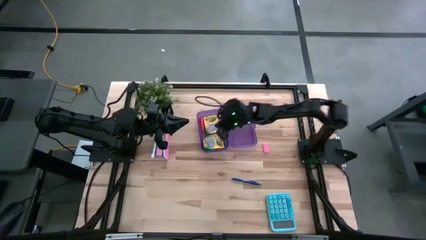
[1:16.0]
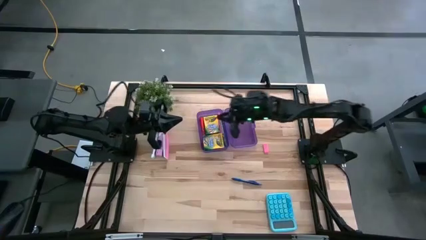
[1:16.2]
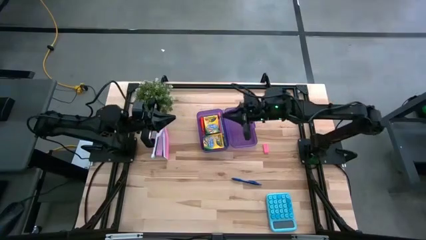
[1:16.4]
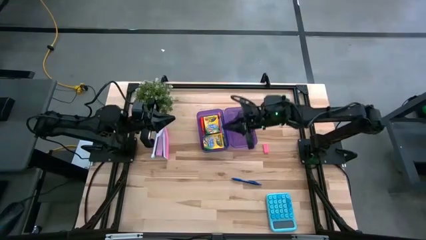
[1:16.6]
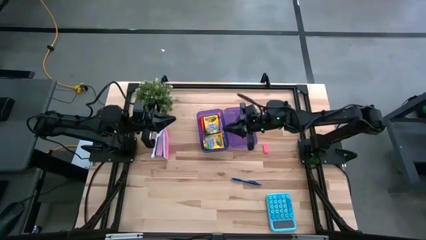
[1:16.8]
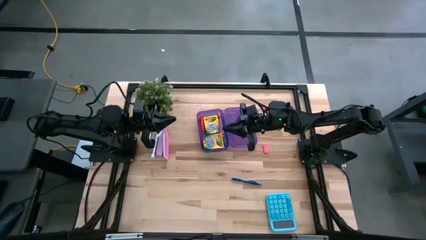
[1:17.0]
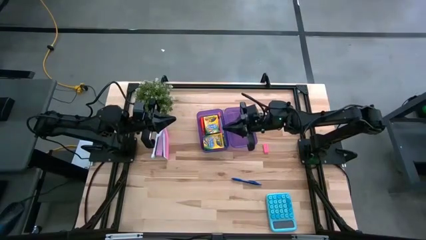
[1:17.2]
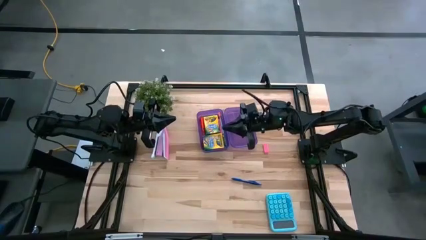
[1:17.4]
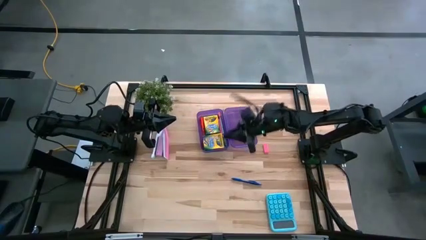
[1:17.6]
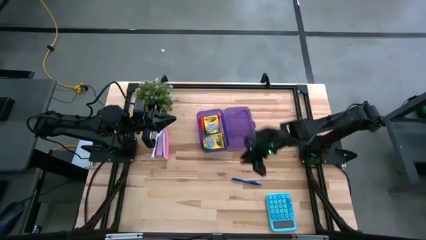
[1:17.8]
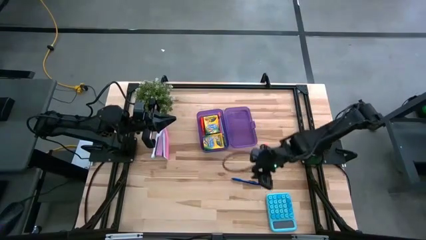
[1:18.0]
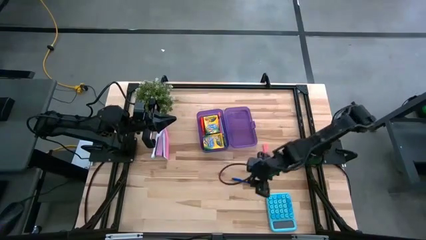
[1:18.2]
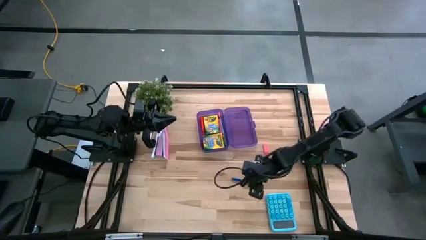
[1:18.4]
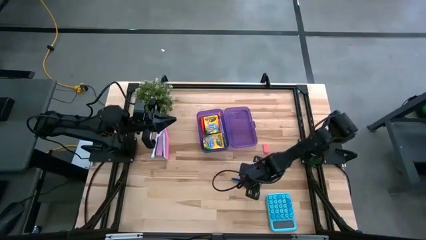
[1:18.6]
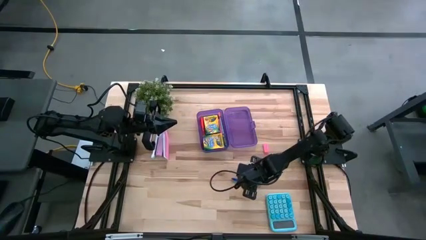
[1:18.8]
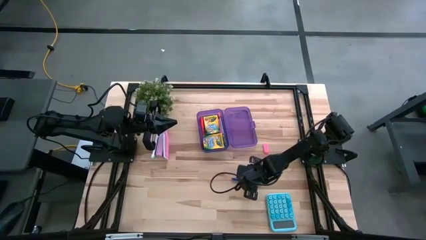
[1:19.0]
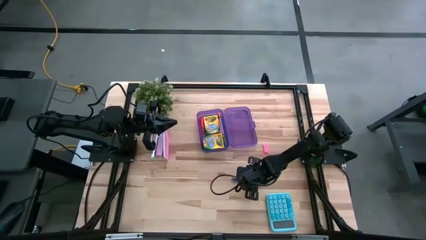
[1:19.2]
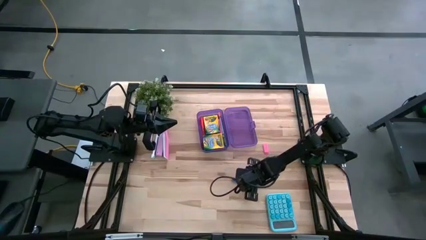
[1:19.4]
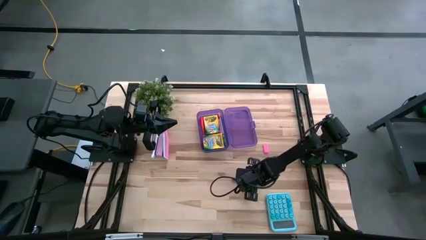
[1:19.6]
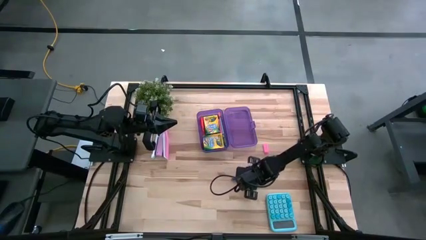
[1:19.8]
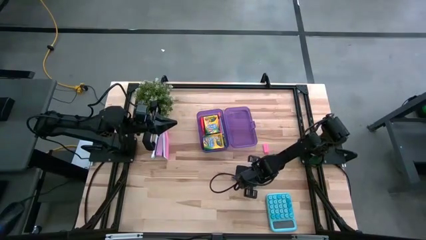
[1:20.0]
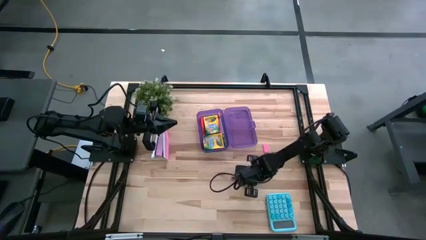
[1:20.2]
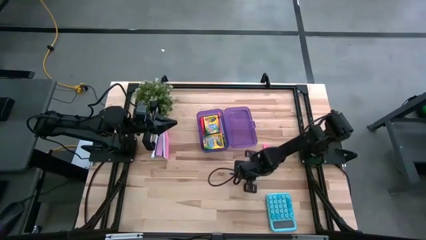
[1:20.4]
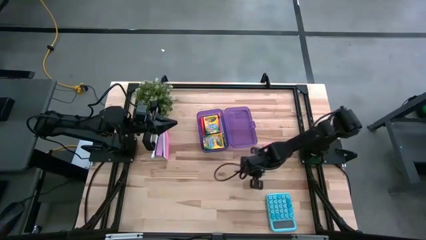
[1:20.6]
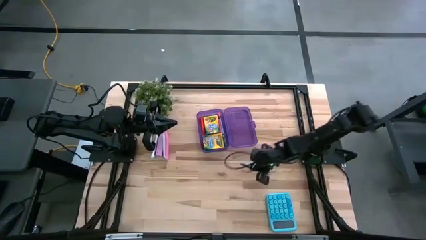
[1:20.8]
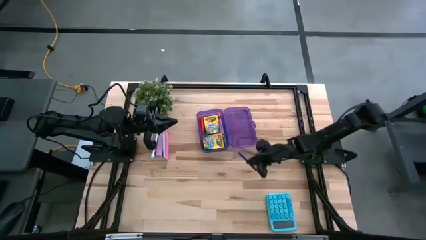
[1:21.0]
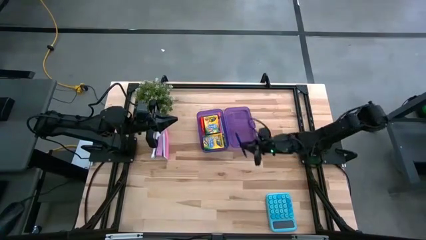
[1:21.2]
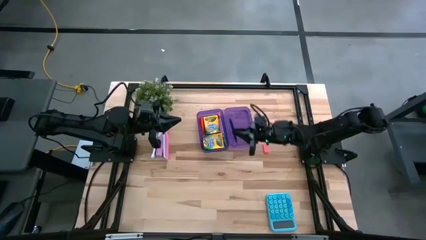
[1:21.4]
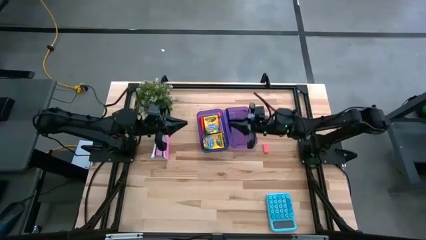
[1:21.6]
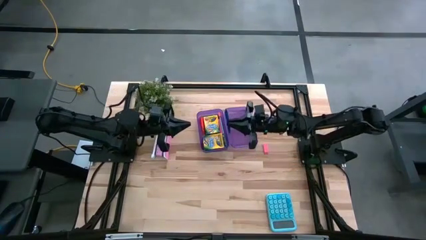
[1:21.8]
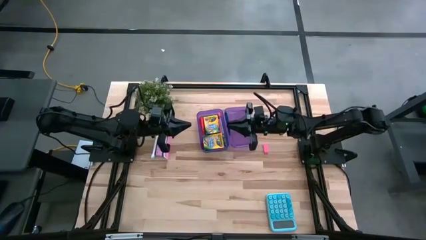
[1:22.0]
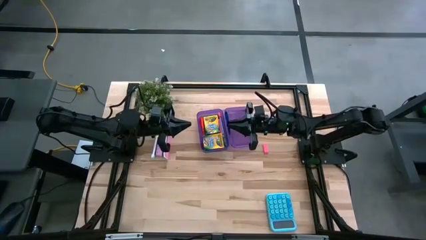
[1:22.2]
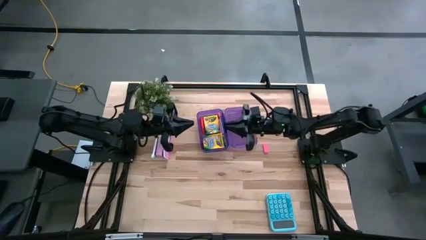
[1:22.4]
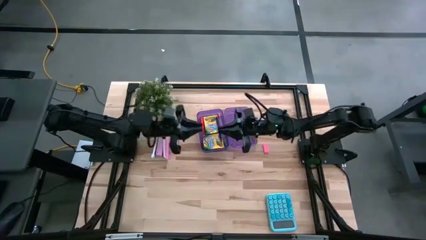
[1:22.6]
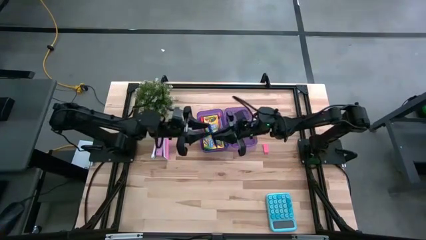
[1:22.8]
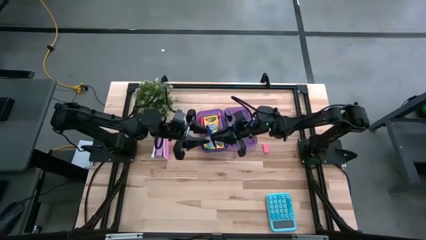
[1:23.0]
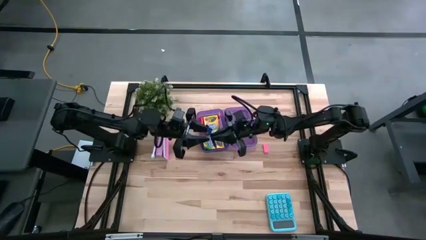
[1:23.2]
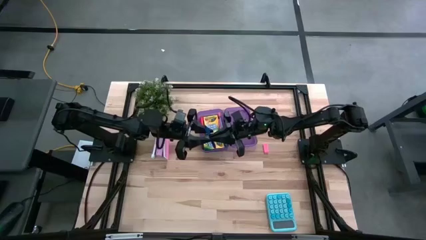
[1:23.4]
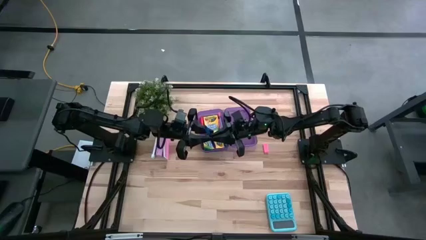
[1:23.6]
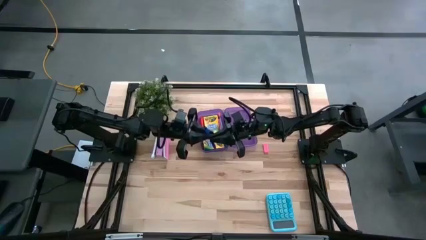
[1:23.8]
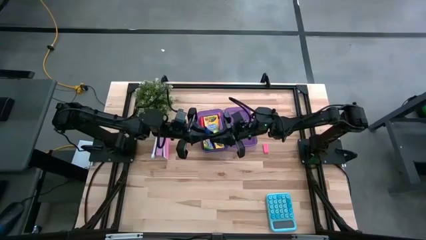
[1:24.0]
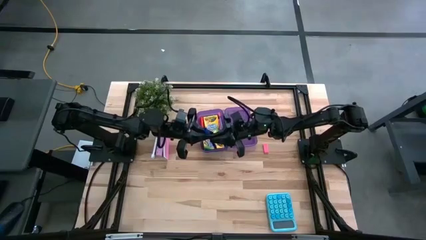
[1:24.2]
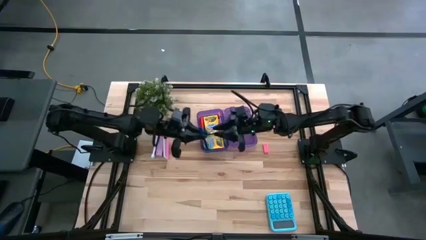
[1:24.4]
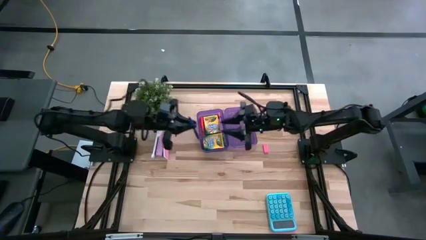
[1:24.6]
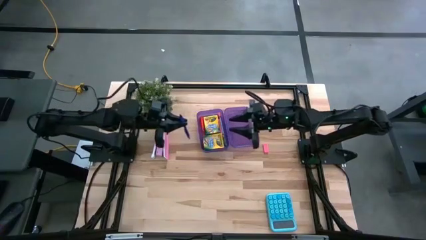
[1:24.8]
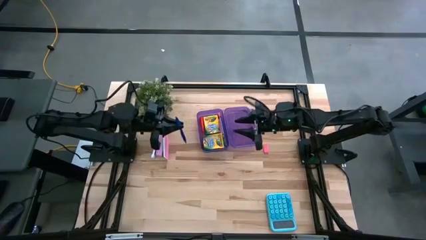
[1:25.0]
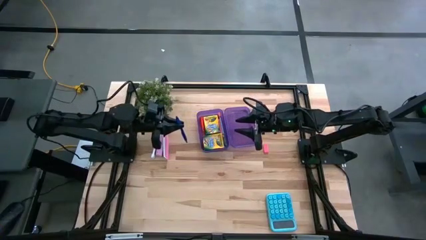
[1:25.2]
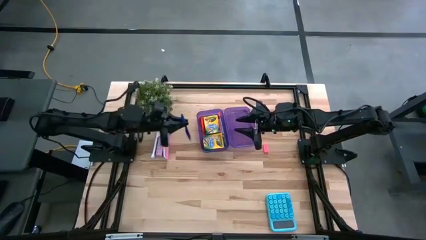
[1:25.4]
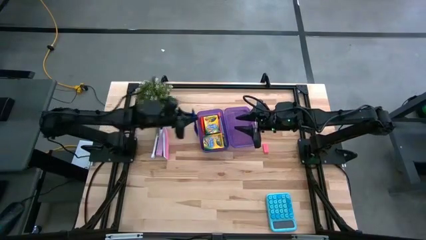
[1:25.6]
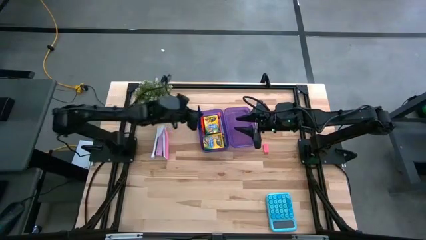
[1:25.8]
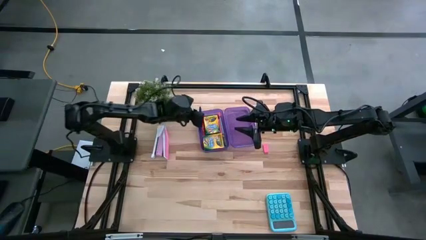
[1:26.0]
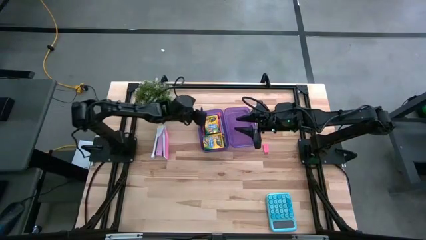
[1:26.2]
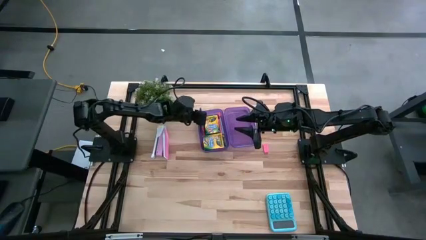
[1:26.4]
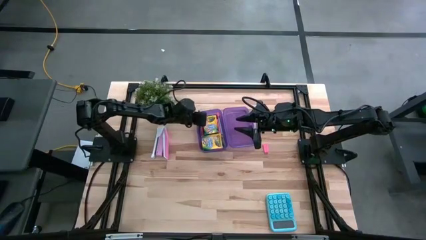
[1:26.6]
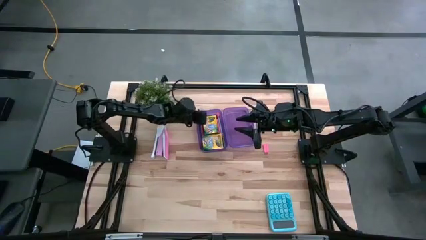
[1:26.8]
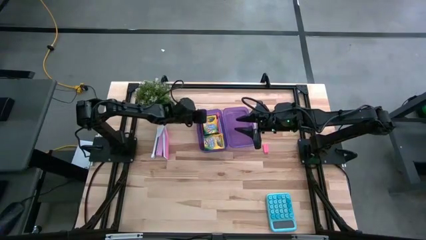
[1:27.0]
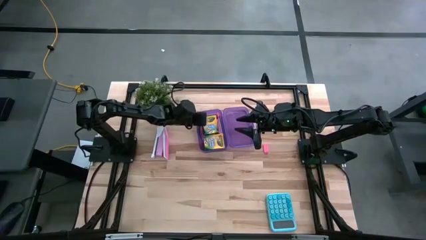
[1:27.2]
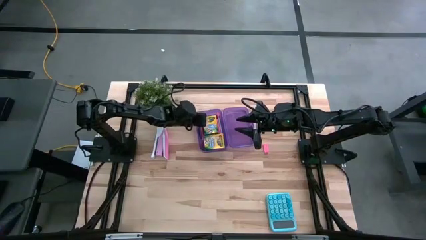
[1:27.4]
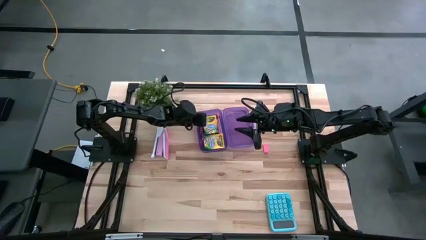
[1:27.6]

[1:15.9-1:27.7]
Task: Pick & place school supplies into a supply box
Put the blue pen into the purple supply box

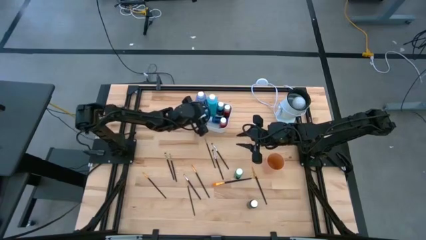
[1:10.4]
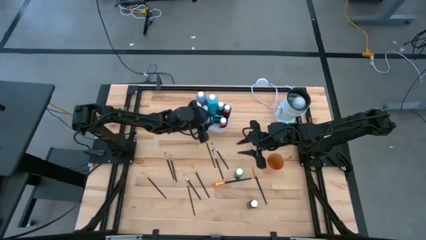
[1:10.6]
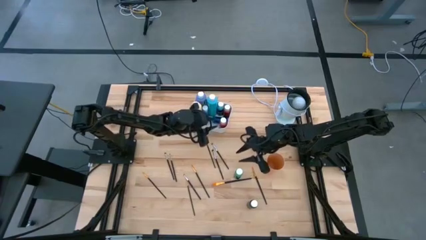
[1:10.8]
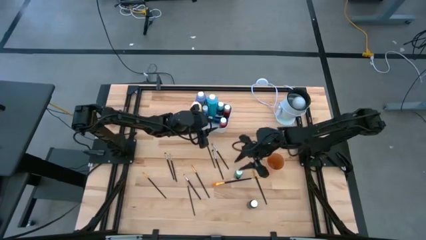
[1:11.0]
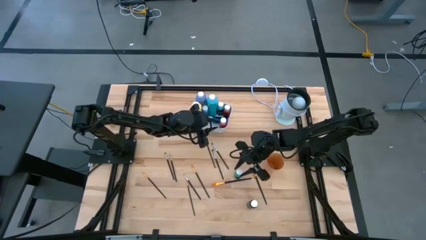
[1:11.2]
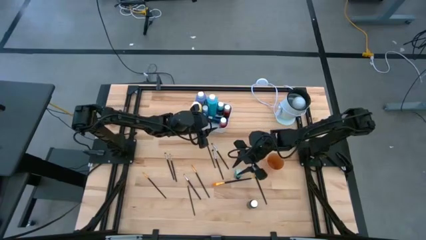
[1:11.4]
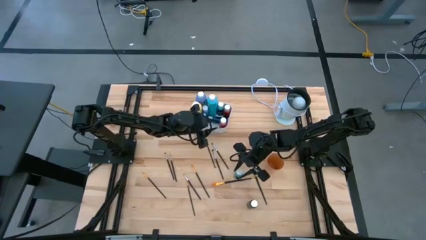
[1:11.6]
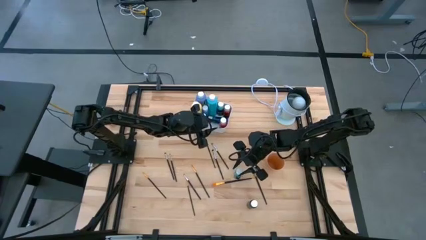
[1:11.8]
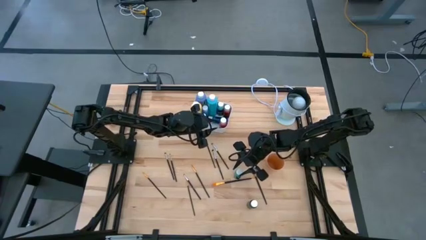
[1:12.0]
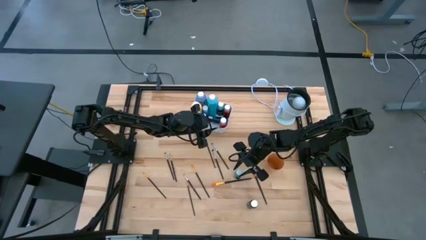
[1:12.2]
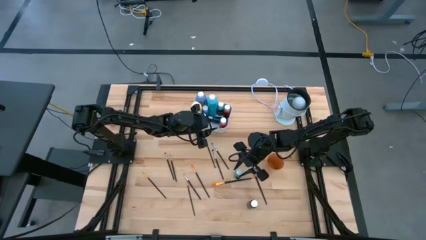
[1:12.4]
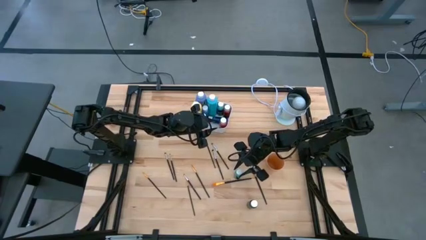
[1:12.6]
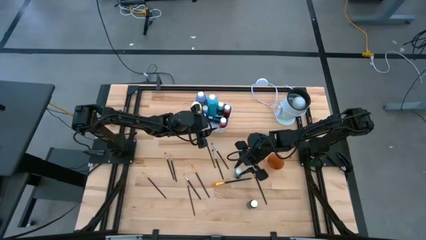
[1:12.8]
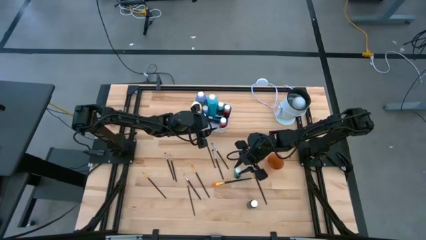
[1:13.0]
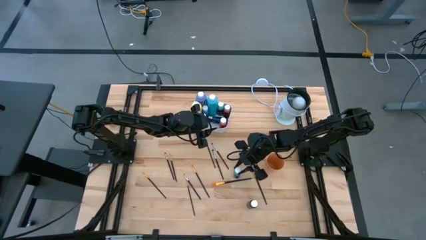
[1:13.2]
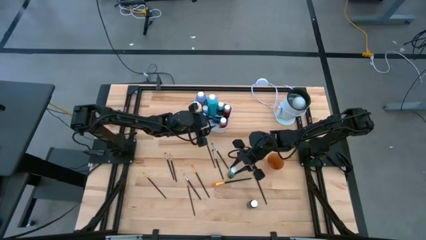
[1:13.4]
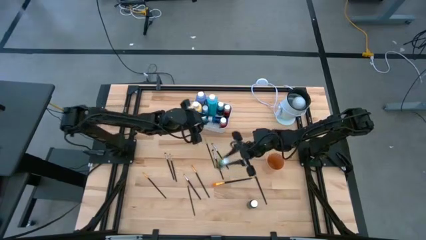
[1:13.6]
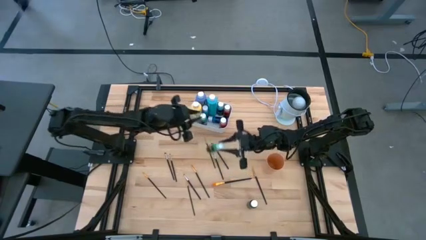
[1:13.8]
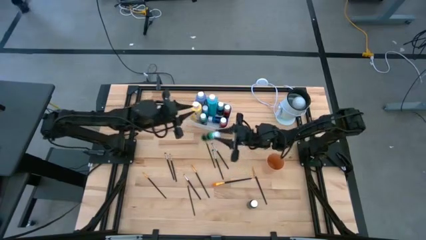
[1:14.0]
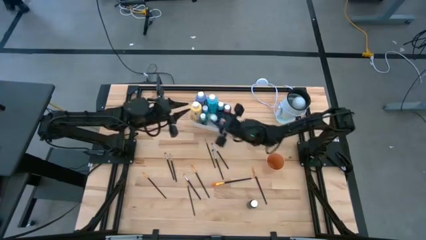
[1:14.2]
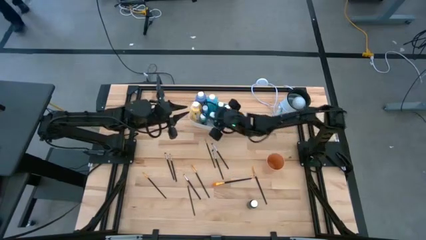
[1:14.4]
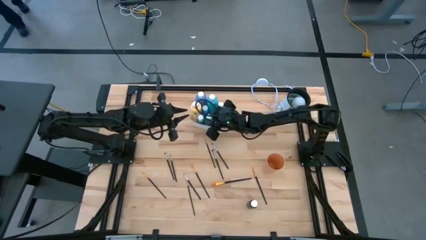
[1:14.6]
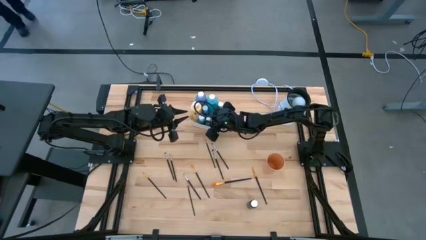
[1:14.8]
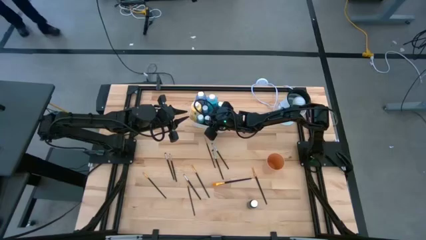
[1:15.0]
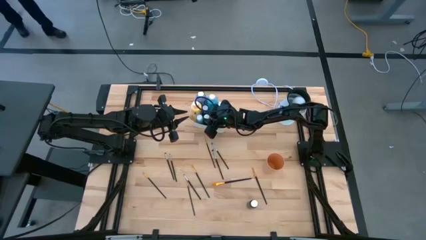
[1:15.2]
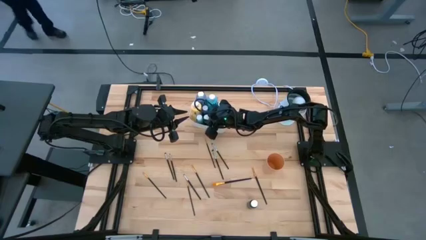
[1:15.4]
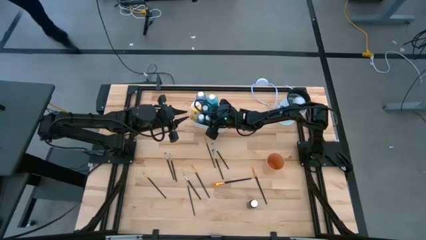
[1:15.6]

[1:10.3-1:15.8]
Task: Pick & Place Paint Supplies
Put the green paint bottle into the white bin
